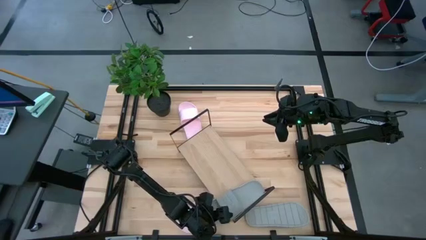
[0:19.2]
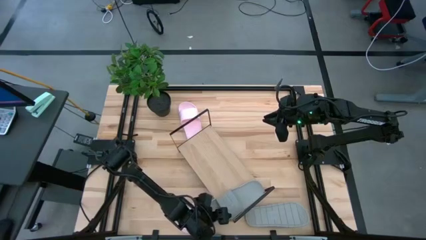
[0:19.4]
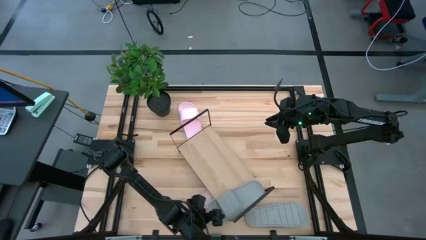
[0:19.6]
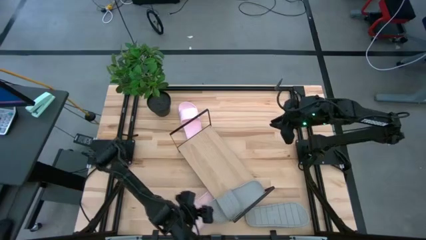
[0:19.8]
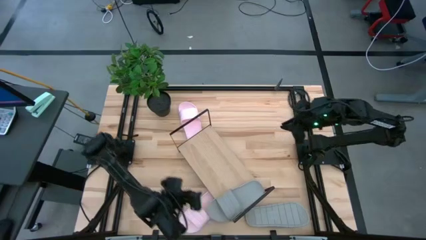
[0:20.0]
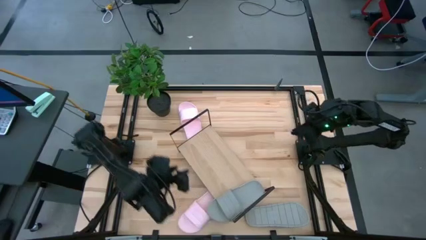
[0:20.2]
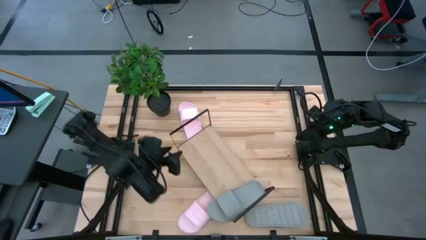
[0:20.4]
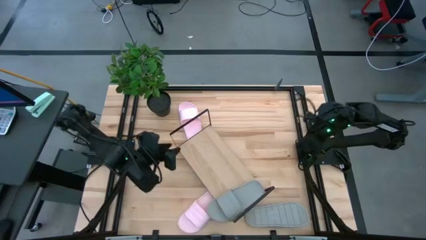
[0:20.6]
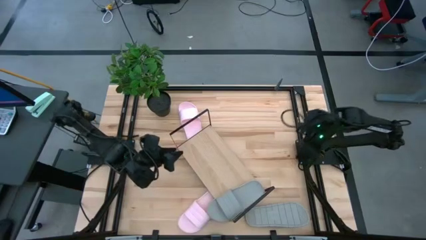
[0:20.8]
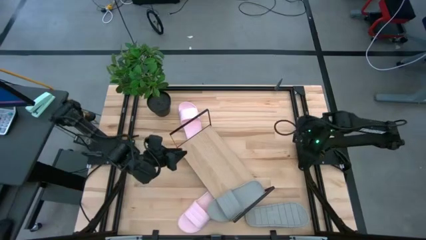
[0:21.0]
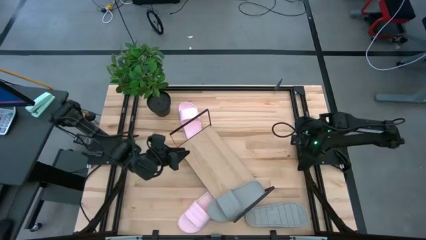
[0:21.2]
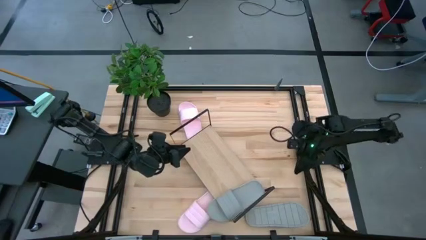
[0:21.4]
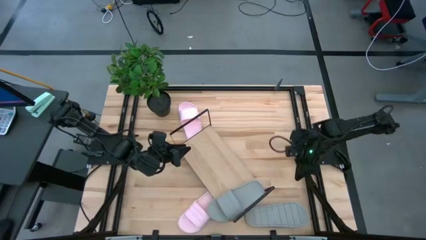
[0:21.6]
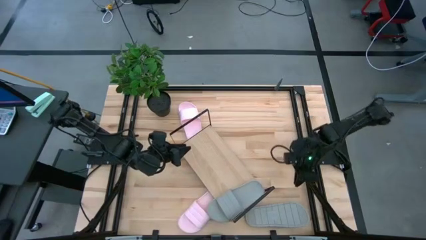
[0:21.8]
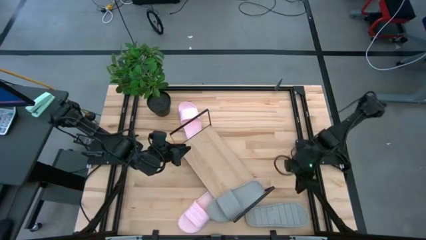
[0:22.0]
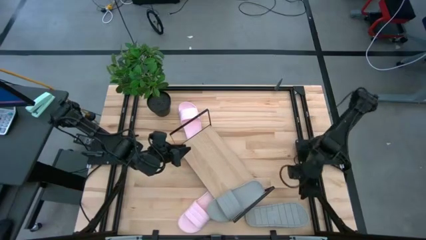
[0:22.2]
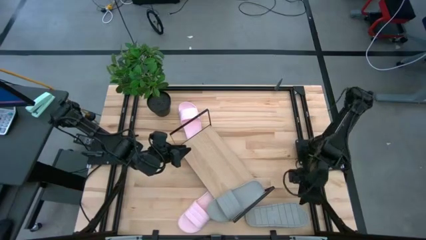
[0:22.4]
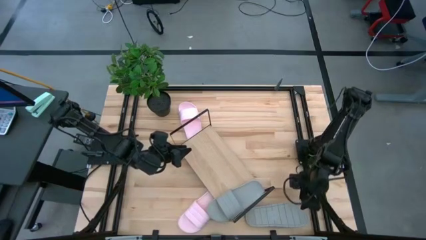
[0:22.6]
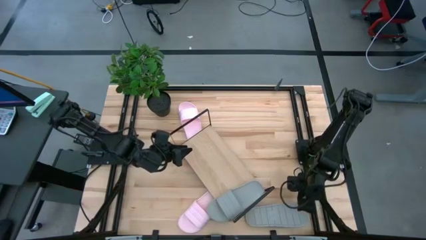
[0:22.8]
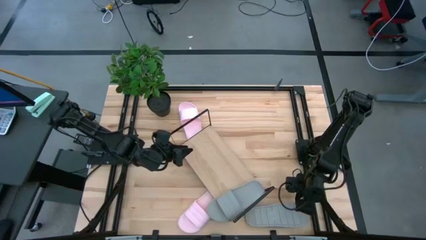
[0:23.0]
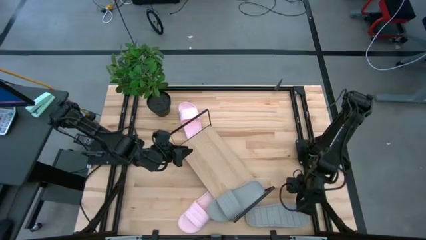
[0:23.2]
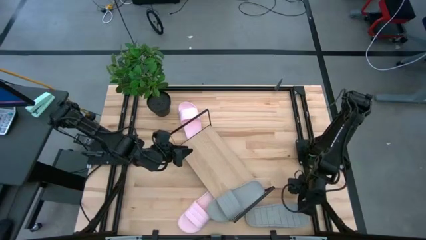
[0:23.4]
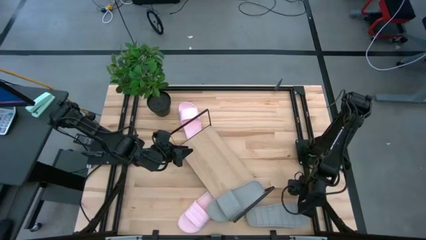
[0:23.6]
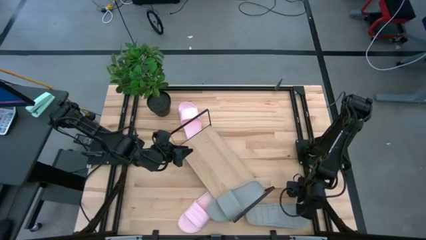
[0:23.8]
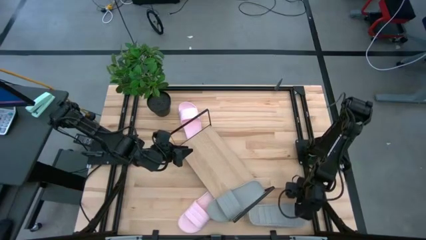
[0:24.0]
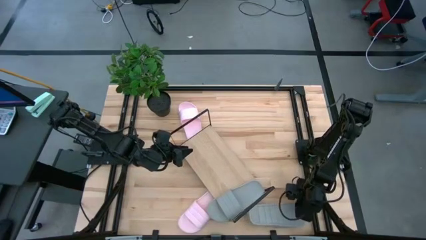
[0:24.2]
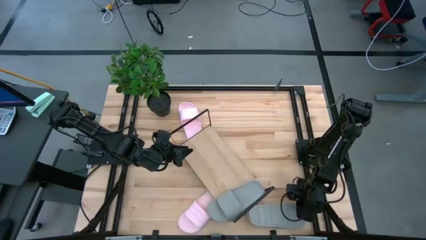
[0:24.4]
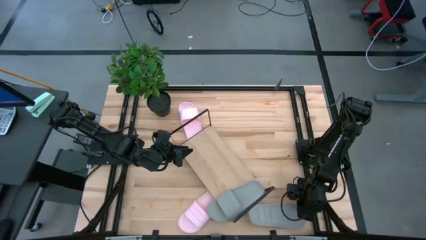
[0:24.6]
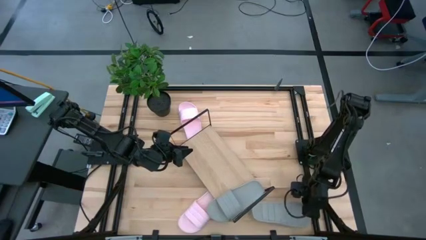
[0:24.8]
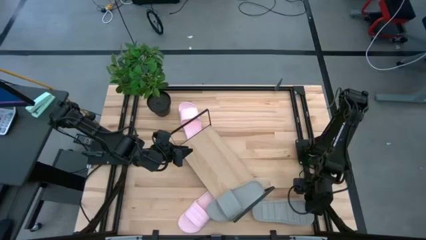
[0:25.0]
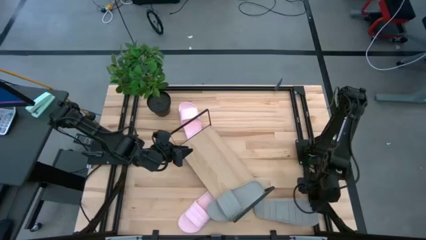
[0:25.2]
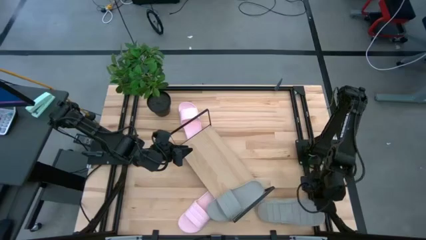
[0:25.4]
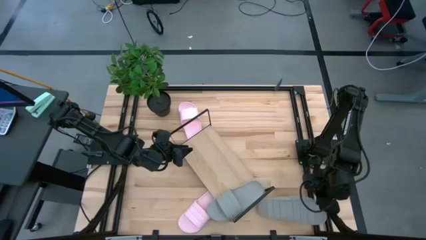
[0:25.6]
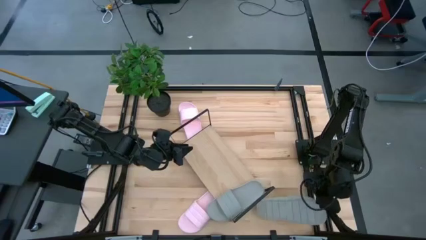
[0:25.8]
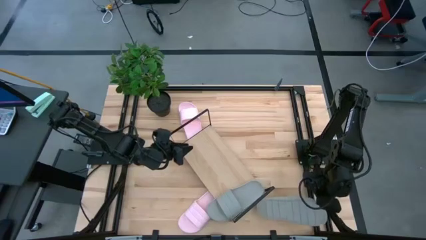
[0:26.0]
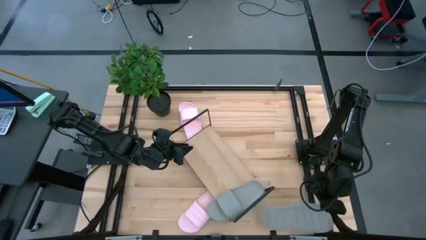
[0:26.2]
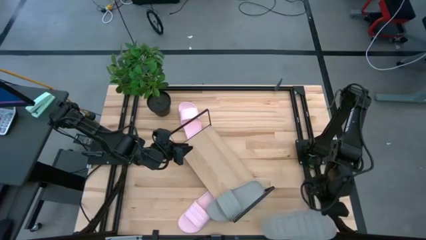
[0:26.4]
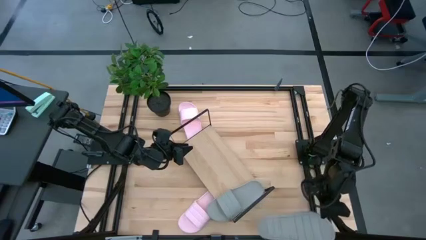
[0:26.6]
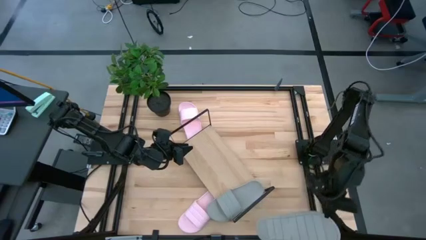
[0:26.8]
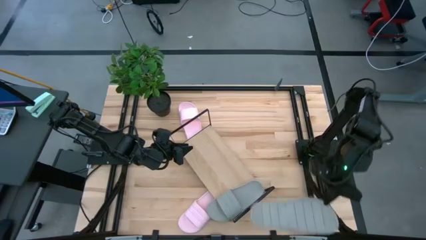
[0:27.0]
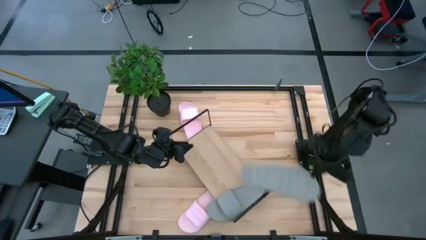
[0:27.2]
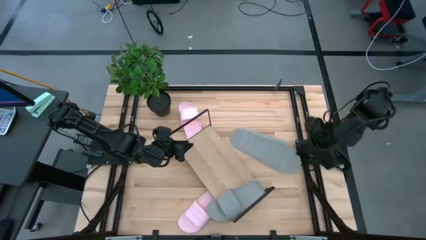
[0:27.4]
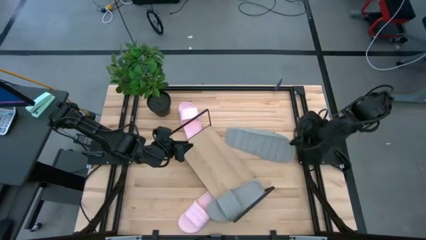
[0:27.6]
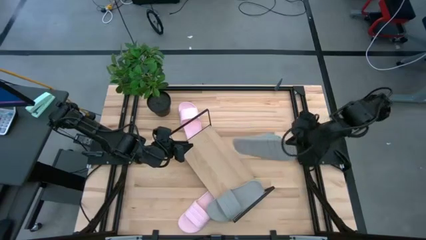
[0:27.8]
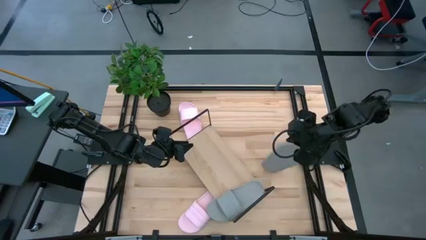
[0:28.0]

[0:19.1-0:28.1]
Task: Pick and place slides into the shelf
Put the gray slide on the shelf
